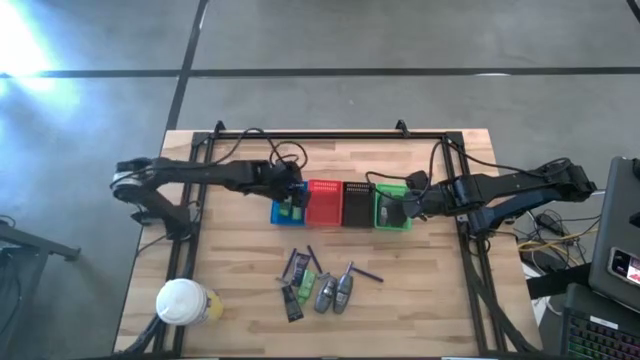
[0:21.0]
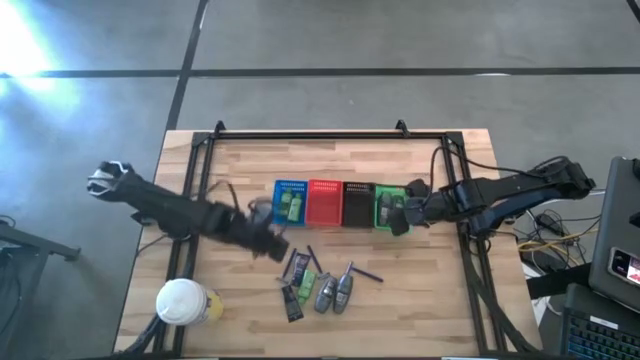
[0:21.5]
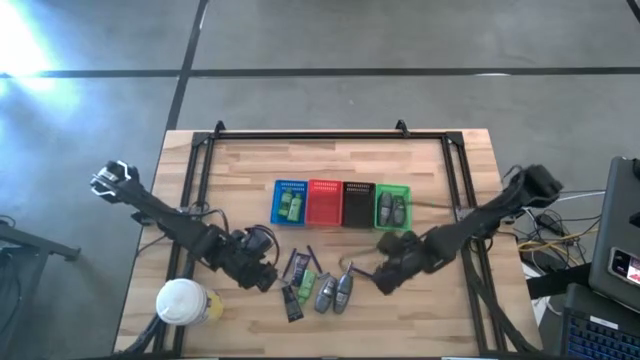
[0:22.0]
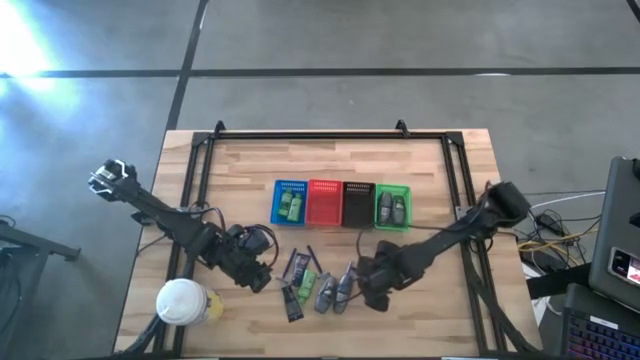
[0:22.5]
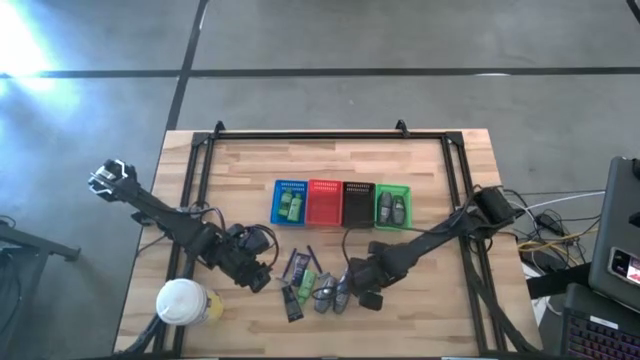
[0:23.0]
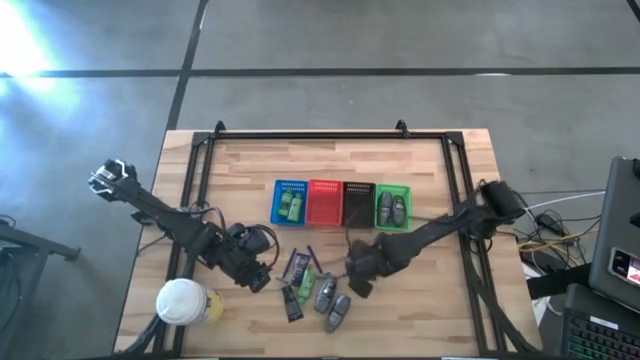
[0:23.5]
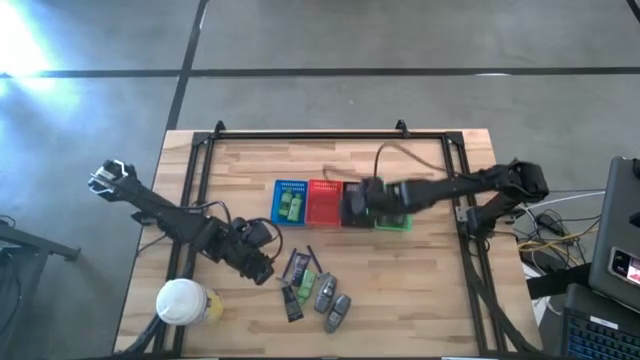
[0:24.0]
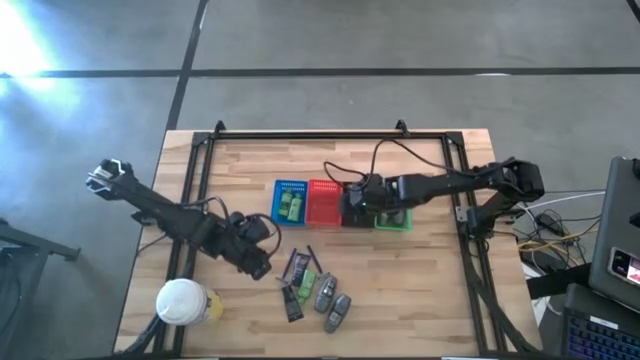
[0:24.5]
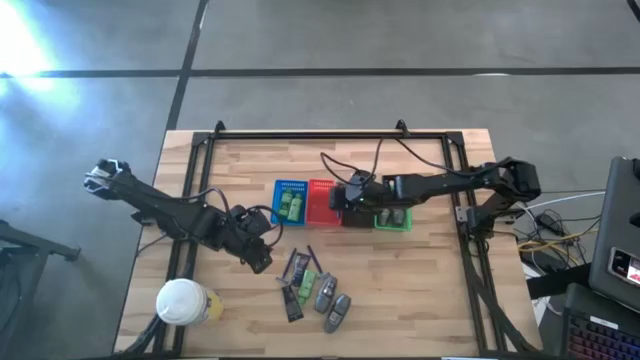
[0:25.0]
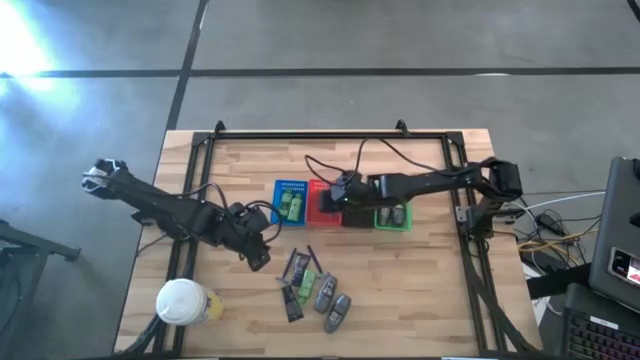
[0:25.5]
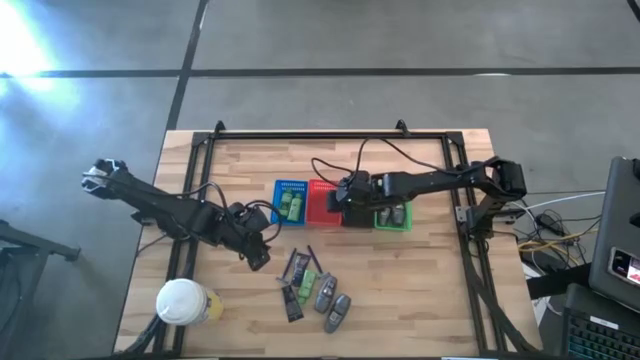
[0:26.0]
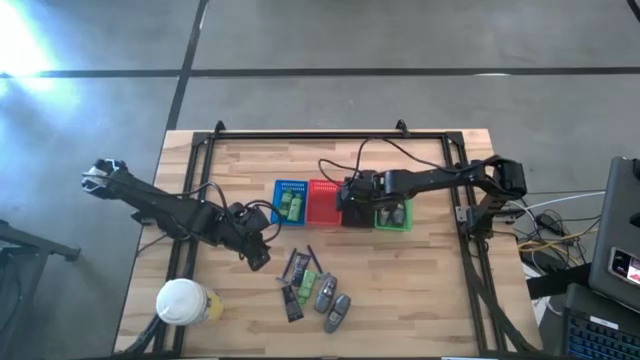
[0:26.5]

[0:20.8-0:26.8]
Task: Pick & Place Travel size toiletries
Put the blue razor into the black bin

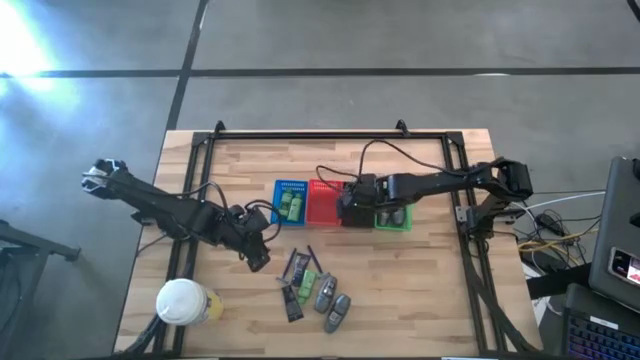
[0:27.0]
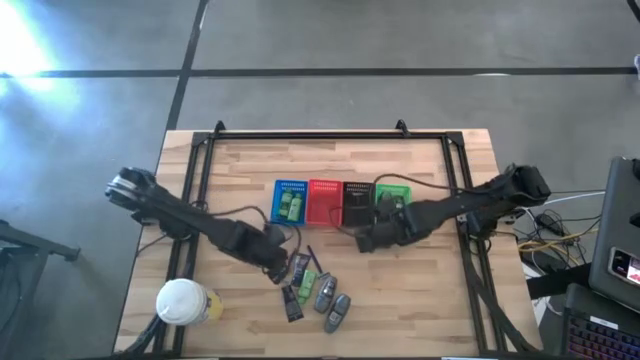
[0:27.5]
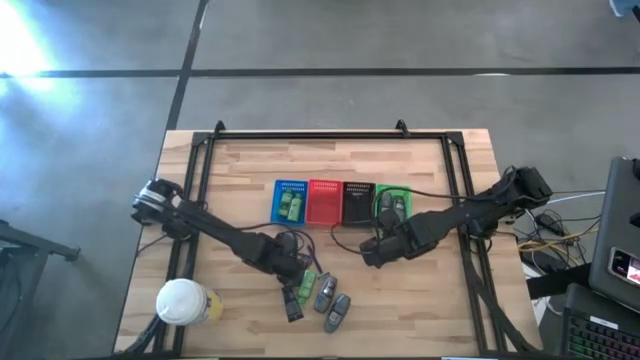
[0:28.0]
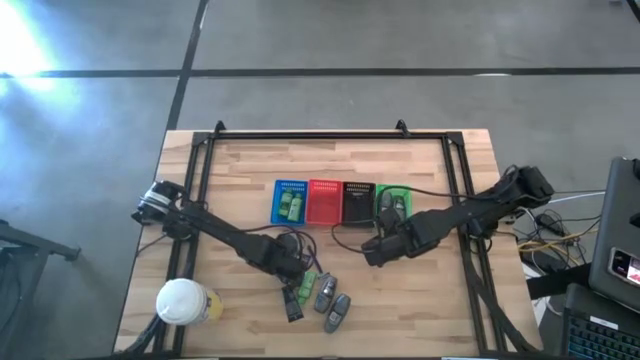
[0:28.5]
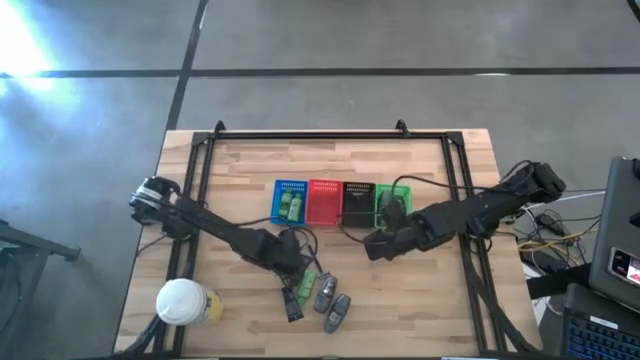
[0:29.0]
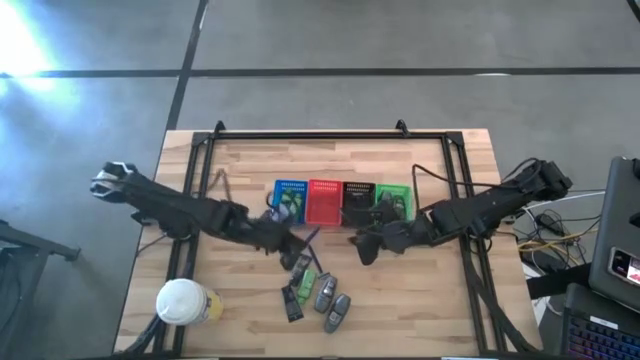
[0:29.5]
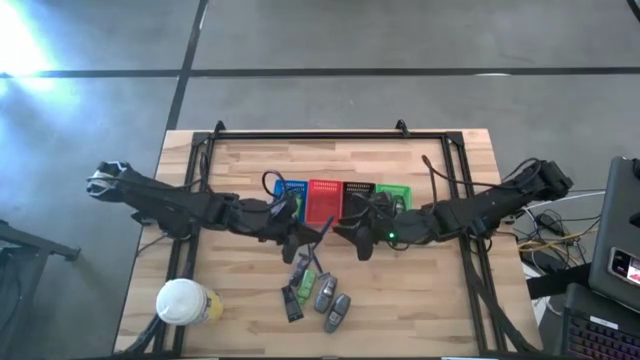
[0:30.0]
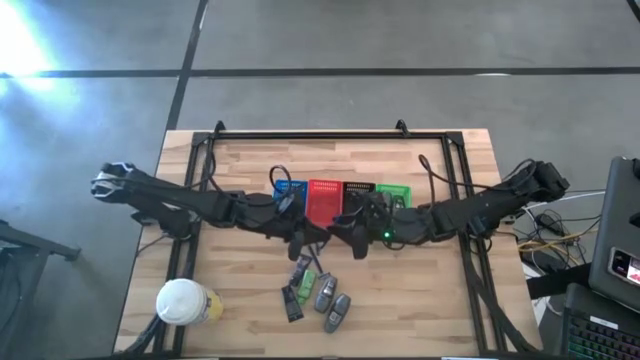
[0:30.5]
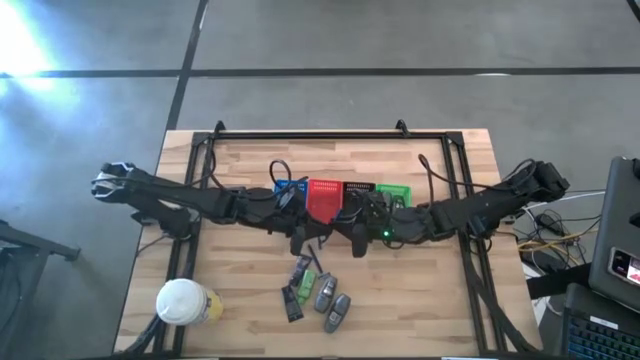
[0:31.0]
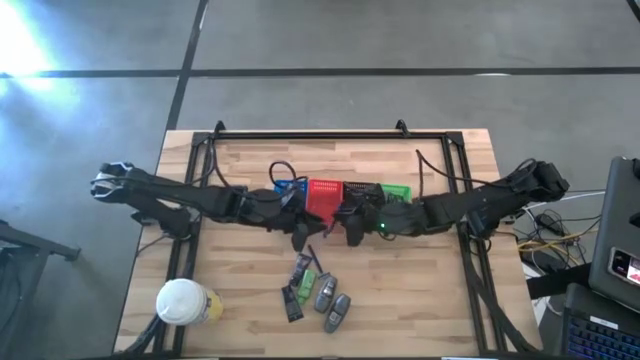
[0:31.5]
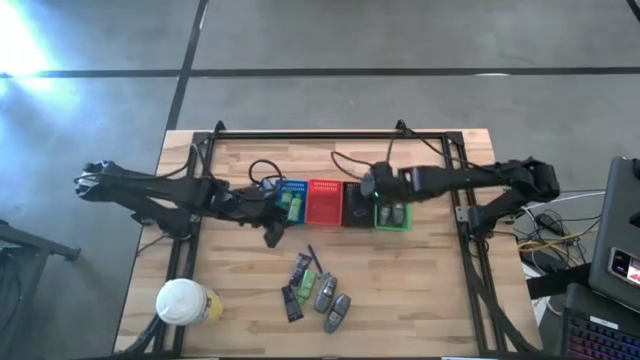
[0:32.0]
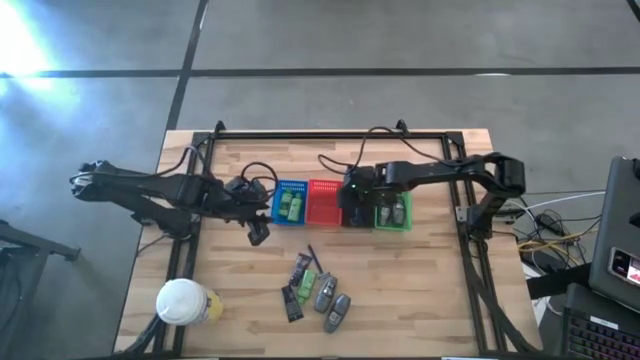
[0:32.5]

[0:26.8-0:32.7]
Put the blue razor into the black bin

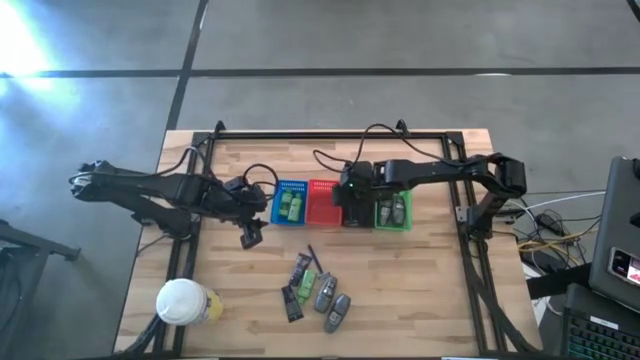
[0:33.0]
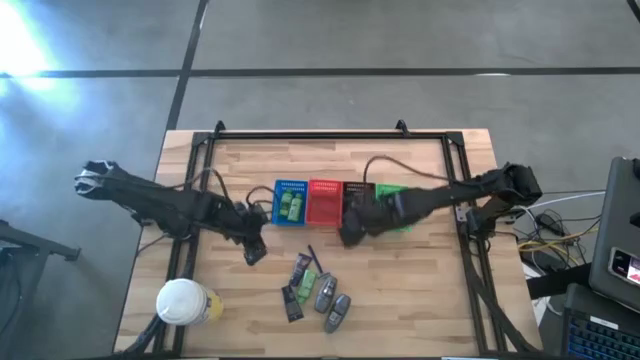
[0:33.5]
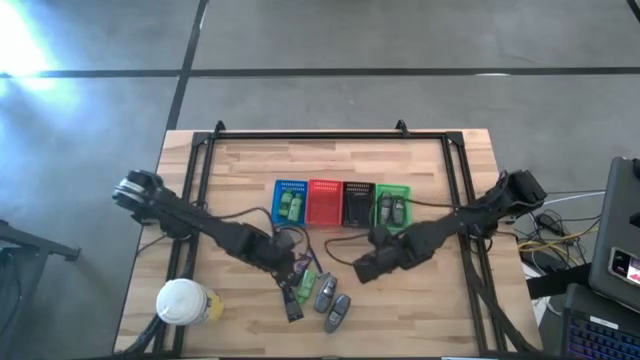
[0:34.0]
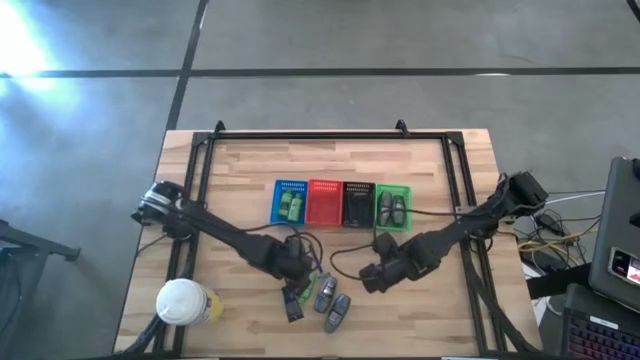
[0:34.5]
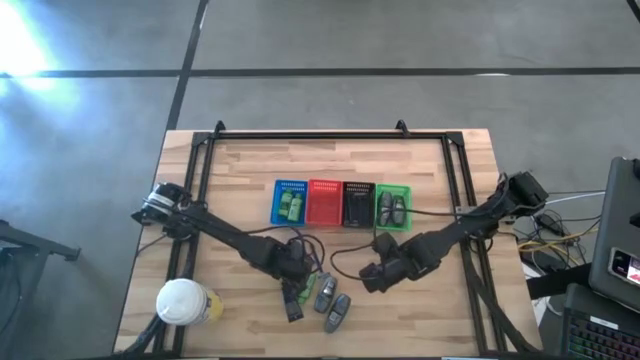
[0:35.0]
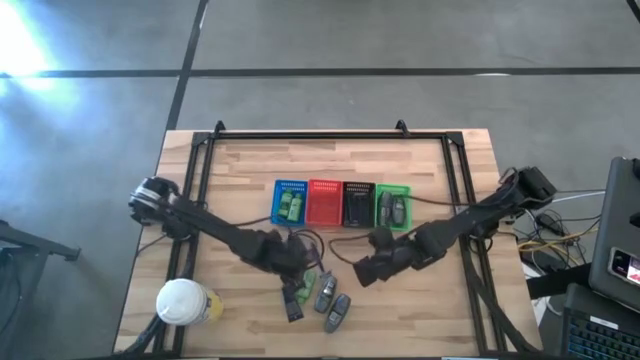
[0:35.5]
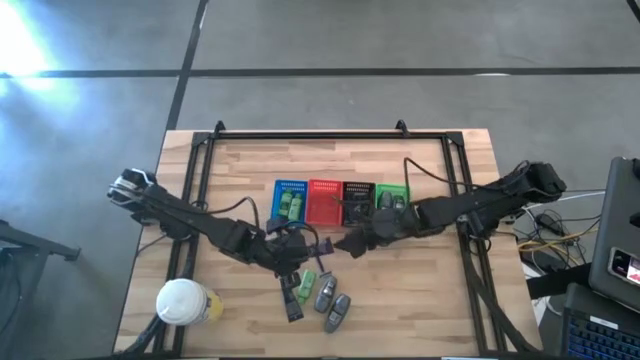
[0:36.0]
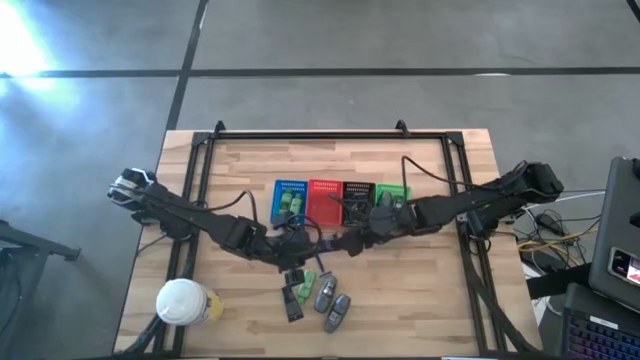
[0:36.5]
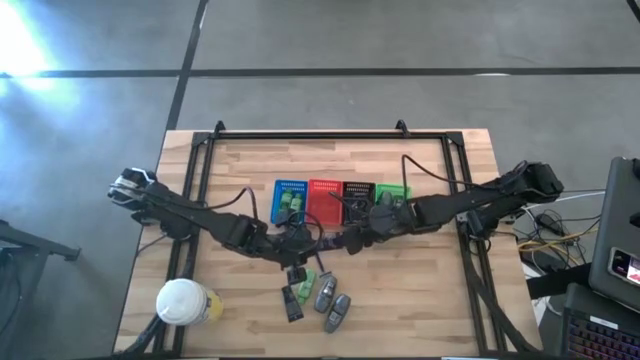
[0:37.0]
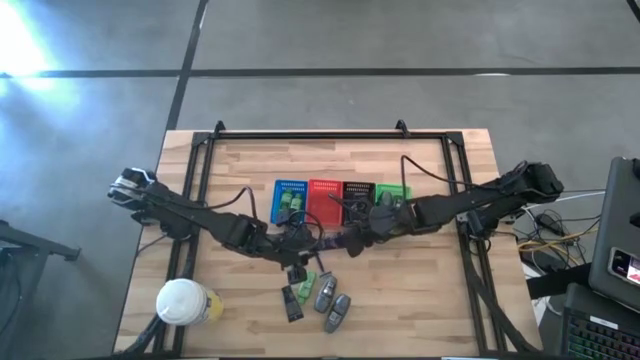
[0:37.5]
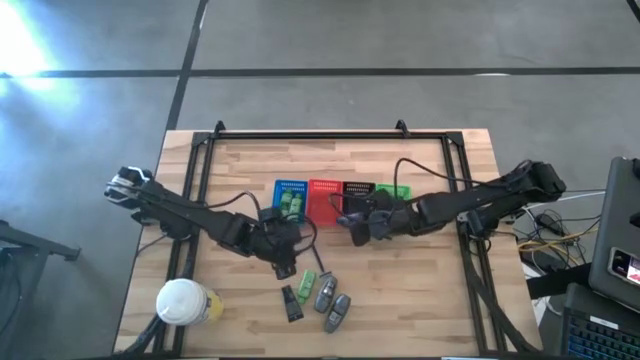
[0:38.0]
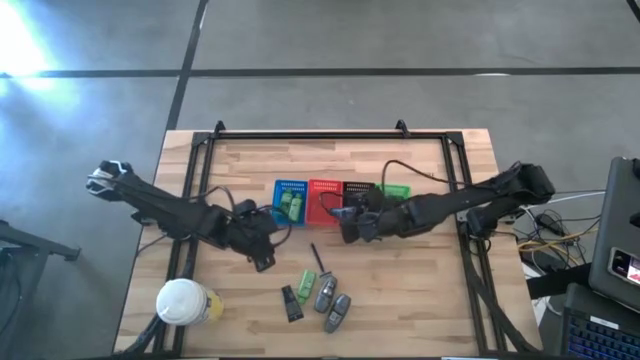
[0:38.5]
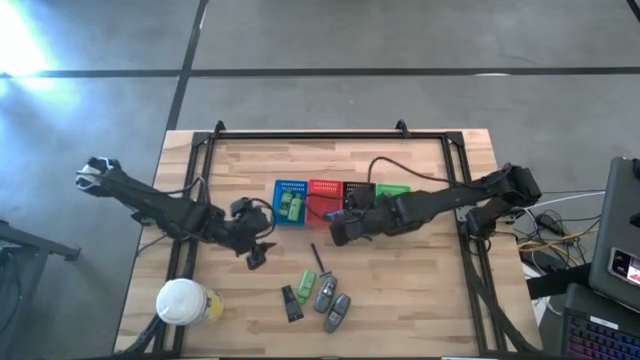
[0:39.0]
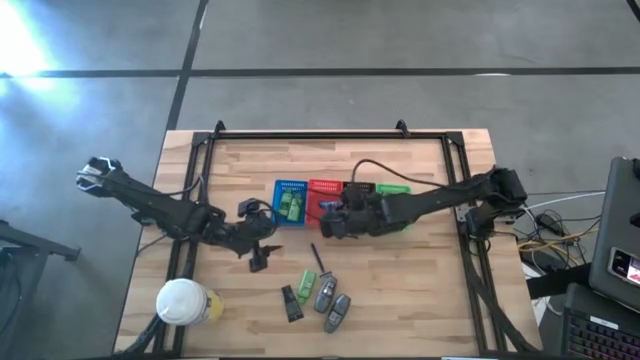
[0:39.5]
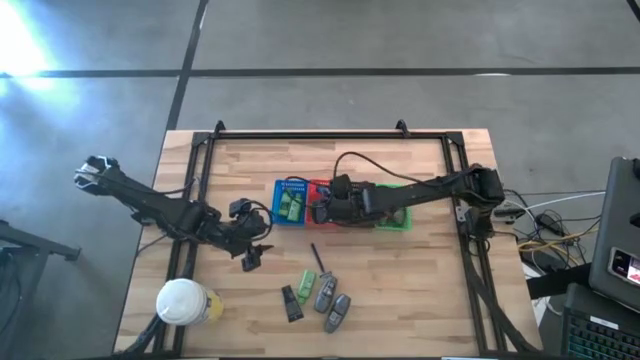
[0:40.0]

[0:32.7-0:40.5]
Put the blue shave cream into the red bin

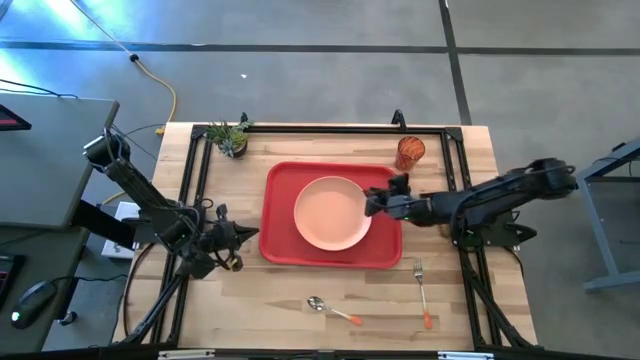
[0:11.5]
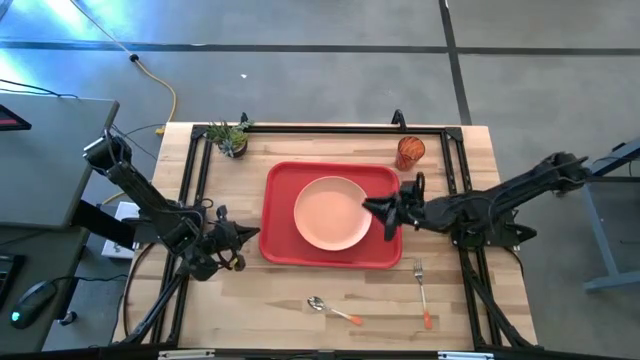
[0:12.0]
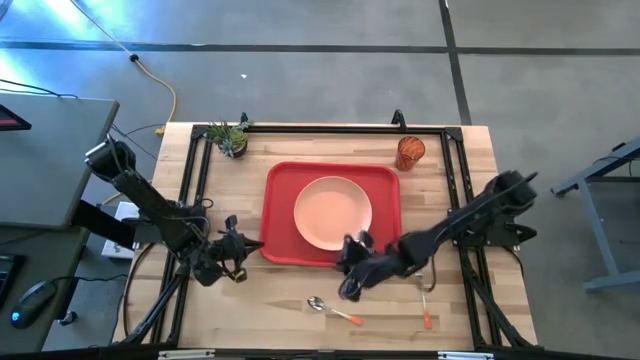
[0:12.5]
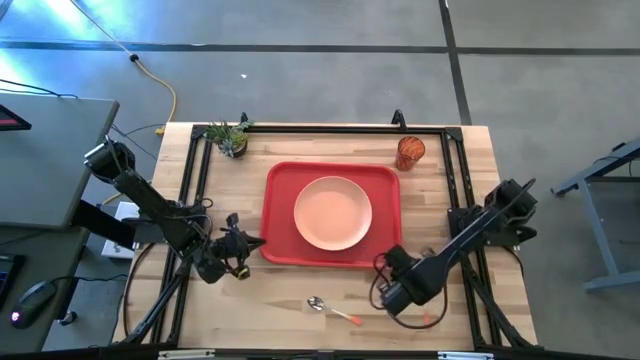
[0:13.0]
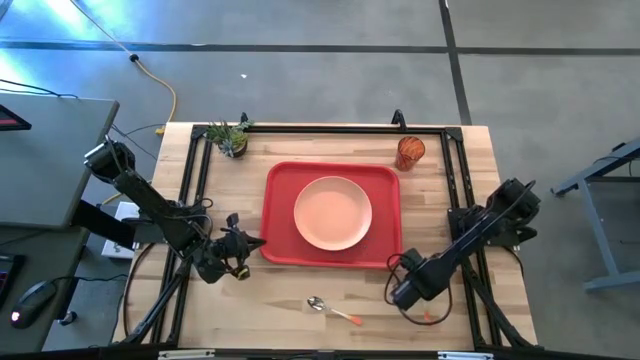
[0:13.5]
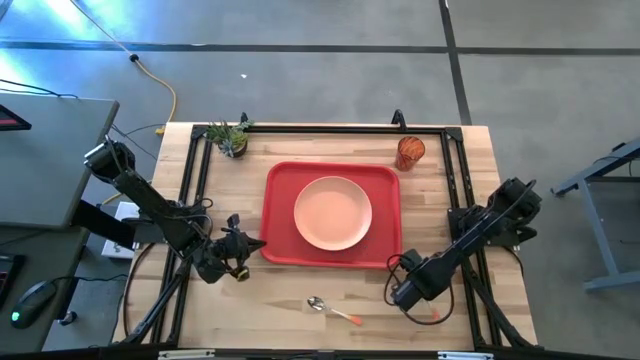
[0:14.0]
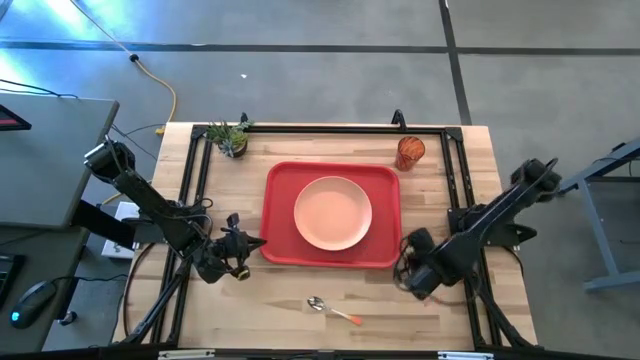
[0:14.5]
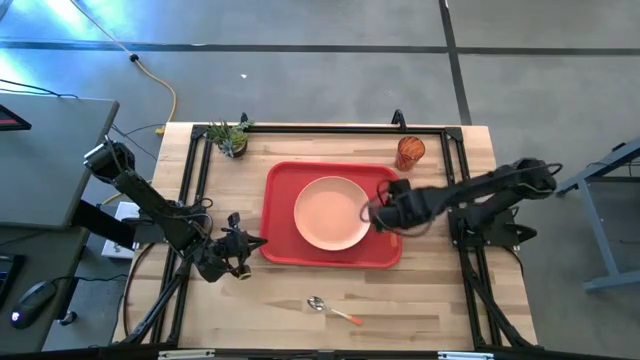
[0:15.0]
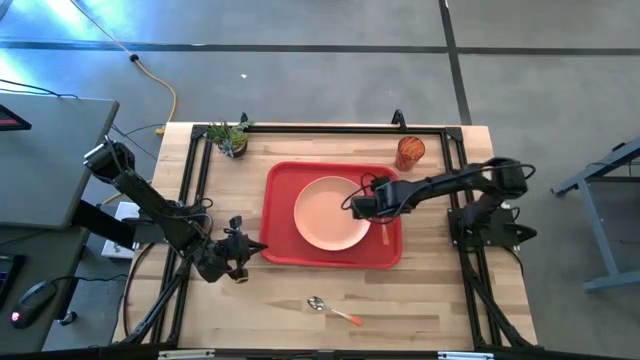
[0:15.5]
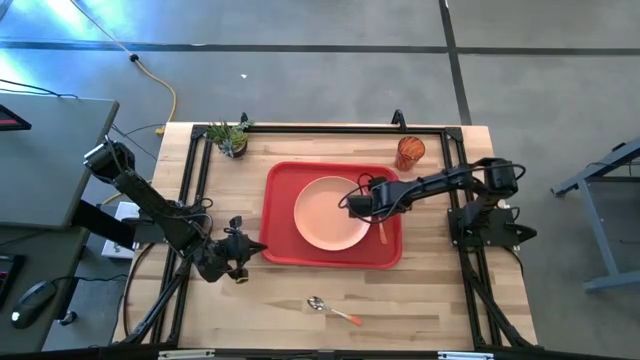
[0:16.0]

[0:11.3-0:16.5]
Task: Pick and place plate/cup/fork/spoon on tray
Put the orange fork on the red tray
